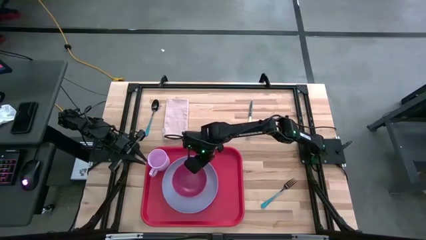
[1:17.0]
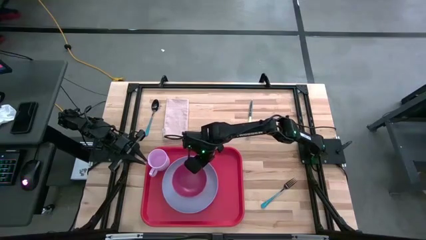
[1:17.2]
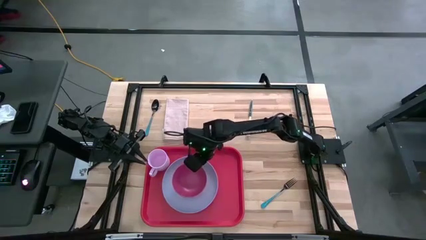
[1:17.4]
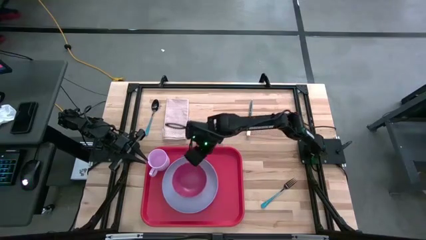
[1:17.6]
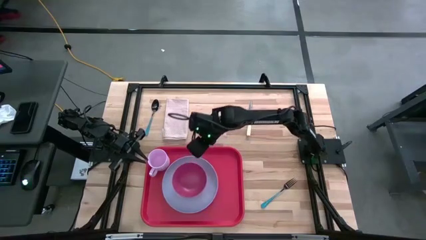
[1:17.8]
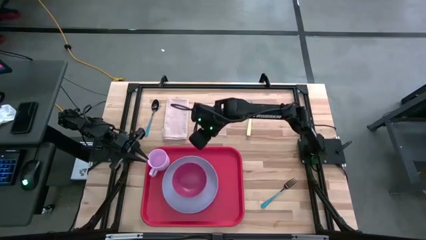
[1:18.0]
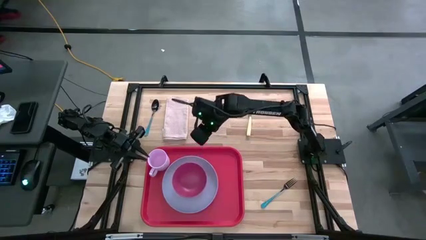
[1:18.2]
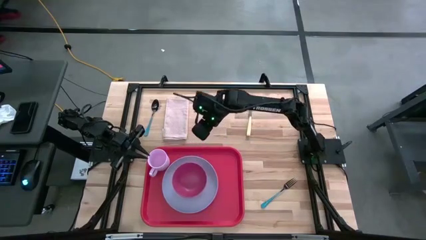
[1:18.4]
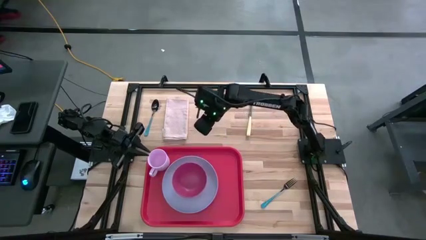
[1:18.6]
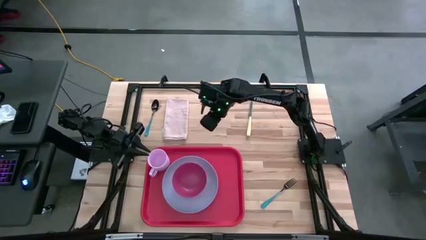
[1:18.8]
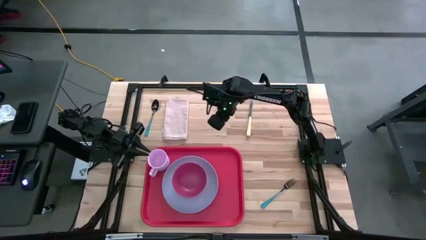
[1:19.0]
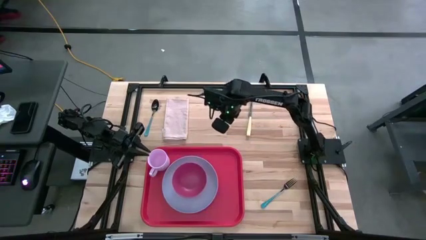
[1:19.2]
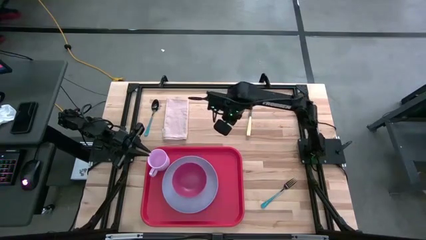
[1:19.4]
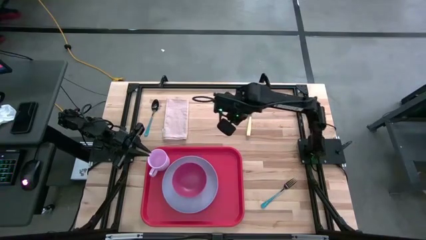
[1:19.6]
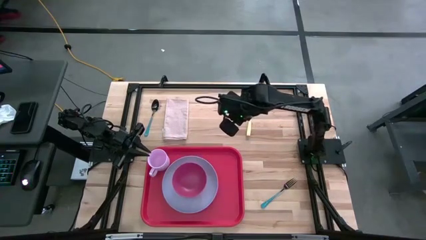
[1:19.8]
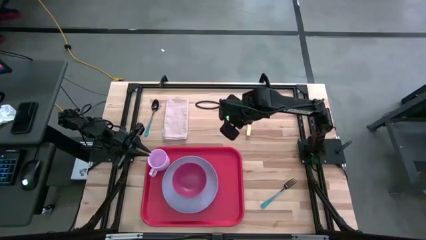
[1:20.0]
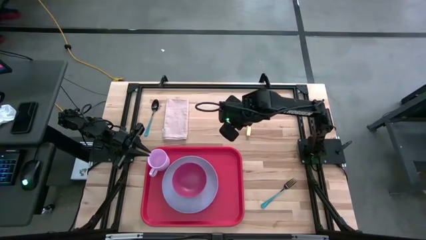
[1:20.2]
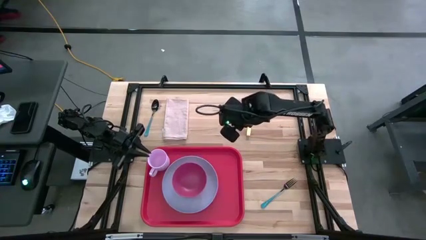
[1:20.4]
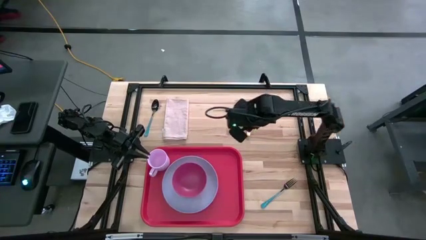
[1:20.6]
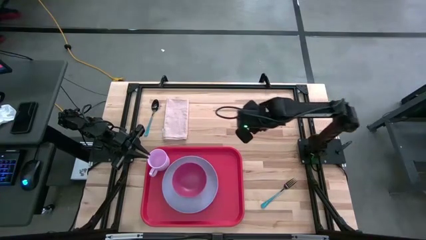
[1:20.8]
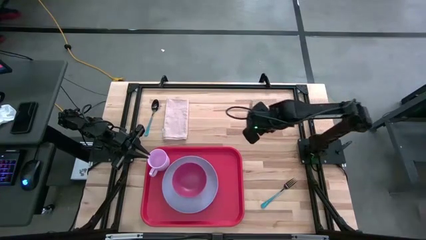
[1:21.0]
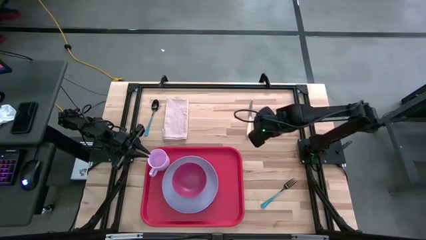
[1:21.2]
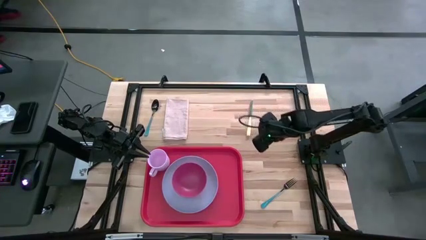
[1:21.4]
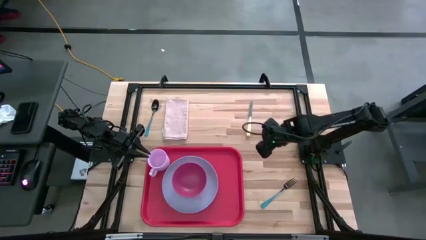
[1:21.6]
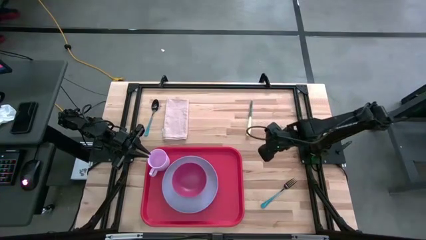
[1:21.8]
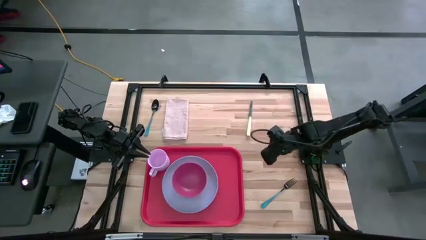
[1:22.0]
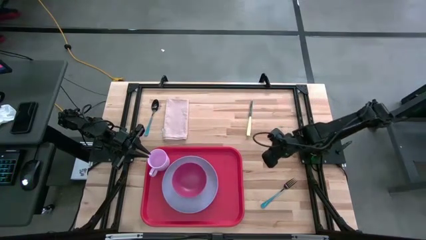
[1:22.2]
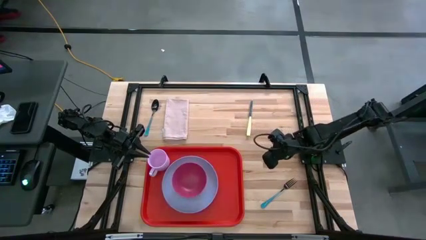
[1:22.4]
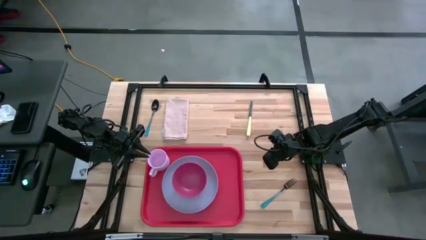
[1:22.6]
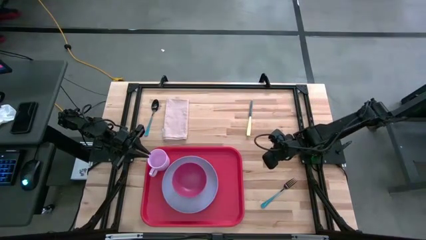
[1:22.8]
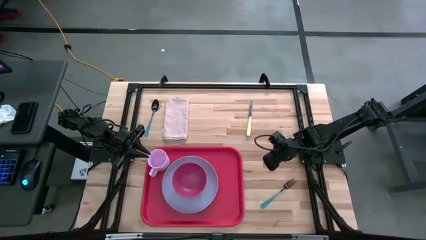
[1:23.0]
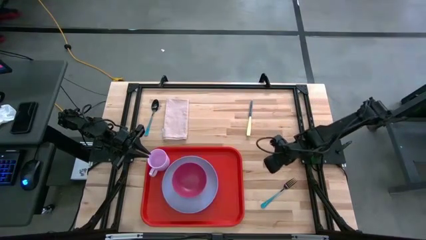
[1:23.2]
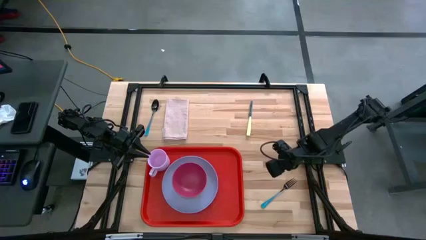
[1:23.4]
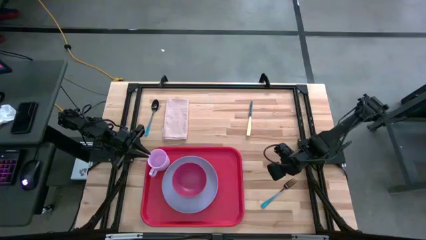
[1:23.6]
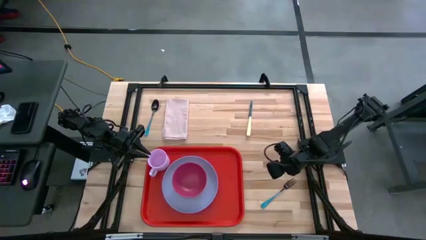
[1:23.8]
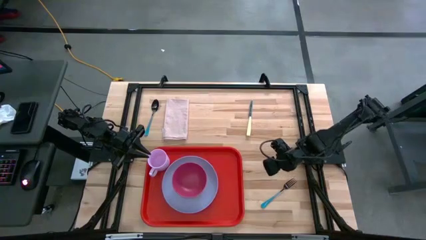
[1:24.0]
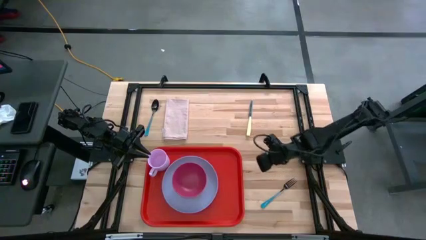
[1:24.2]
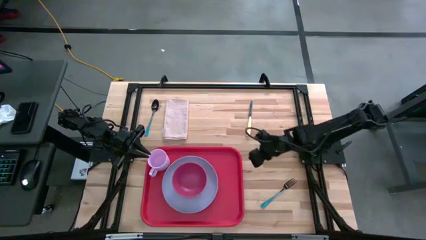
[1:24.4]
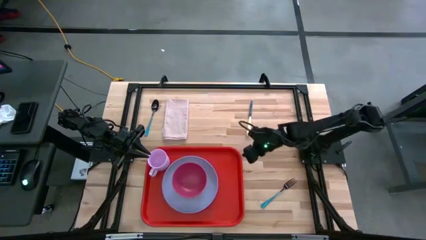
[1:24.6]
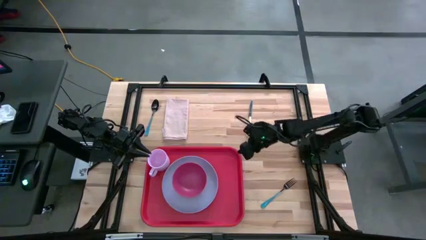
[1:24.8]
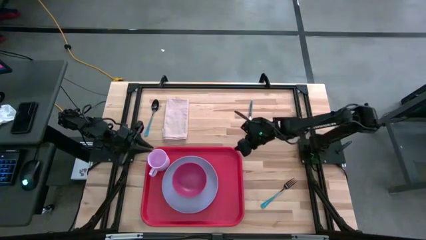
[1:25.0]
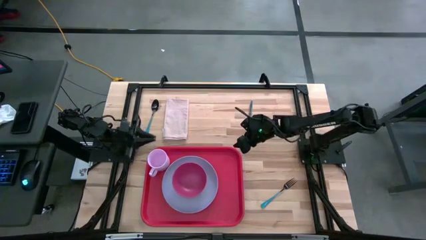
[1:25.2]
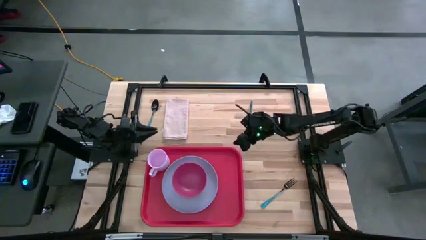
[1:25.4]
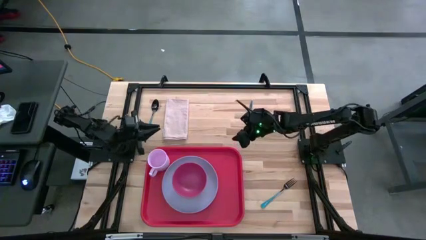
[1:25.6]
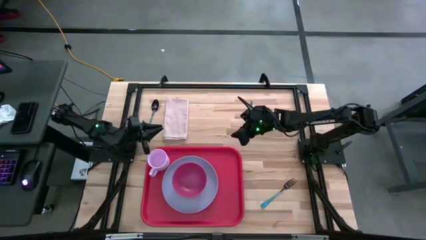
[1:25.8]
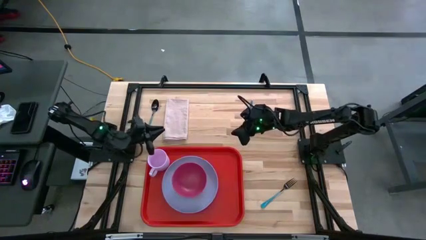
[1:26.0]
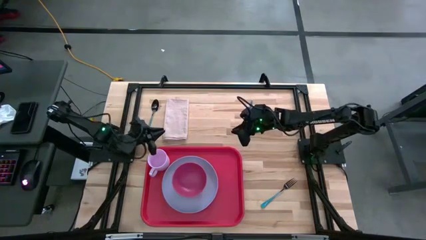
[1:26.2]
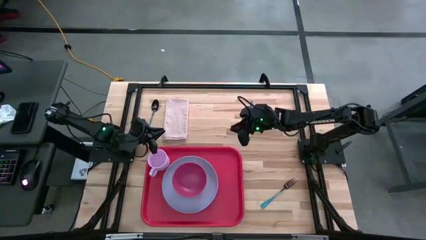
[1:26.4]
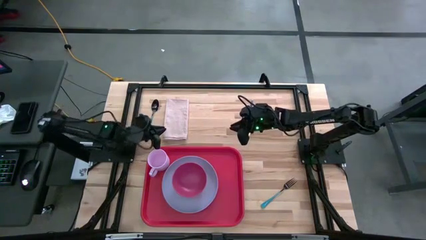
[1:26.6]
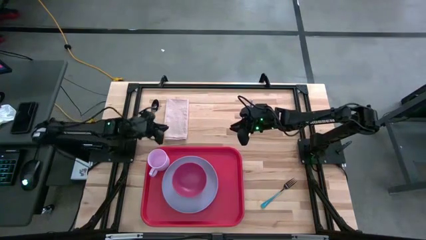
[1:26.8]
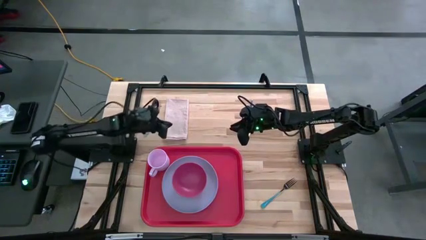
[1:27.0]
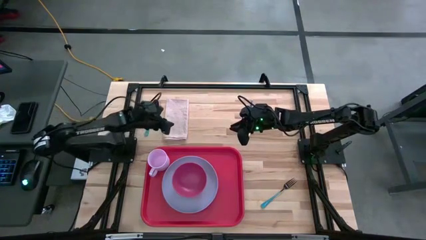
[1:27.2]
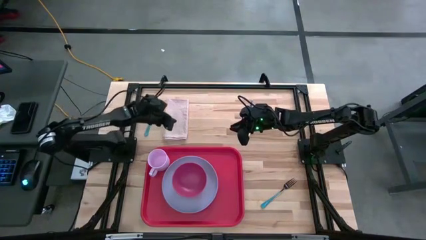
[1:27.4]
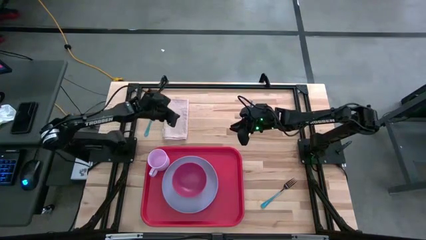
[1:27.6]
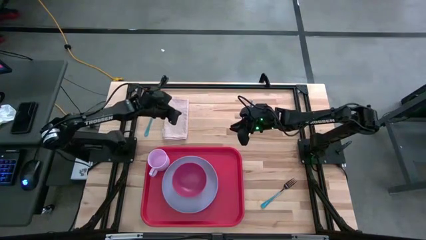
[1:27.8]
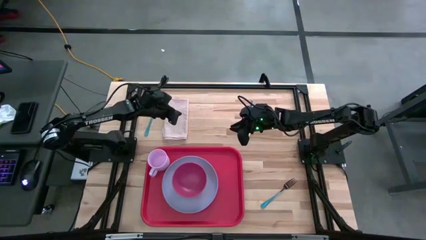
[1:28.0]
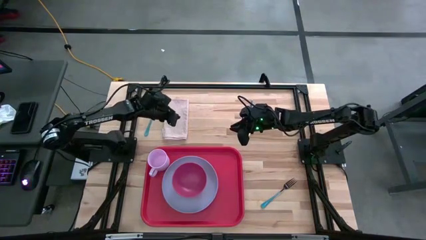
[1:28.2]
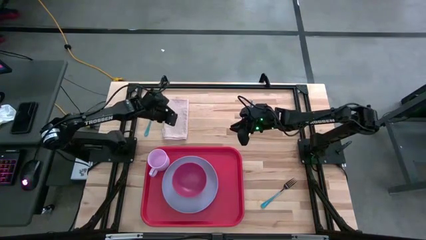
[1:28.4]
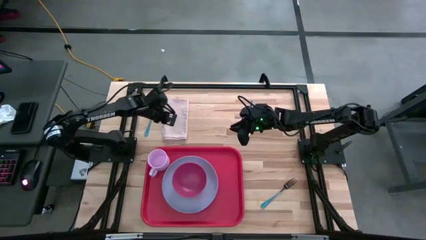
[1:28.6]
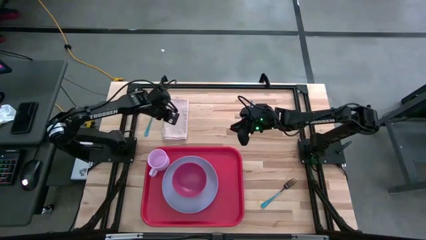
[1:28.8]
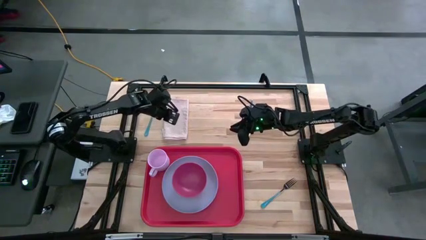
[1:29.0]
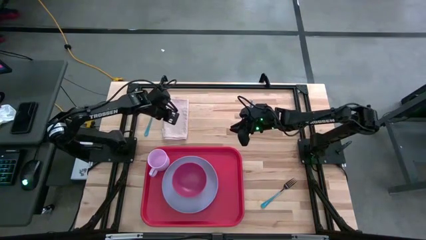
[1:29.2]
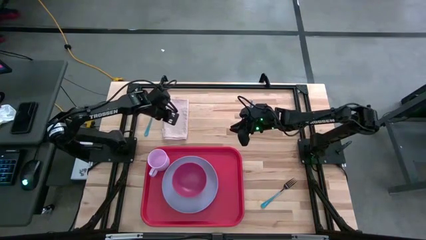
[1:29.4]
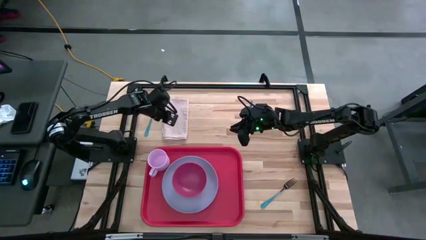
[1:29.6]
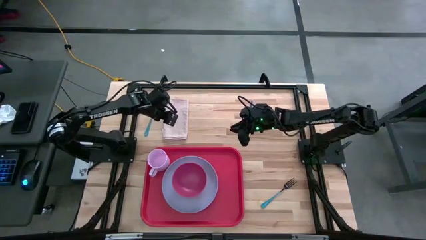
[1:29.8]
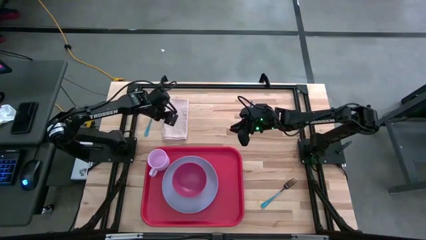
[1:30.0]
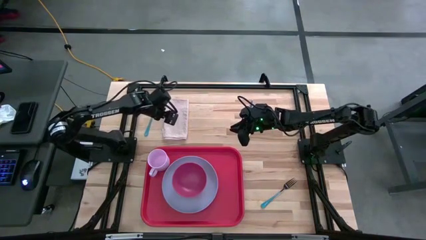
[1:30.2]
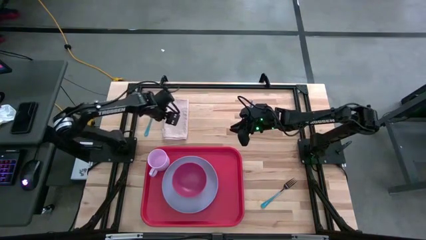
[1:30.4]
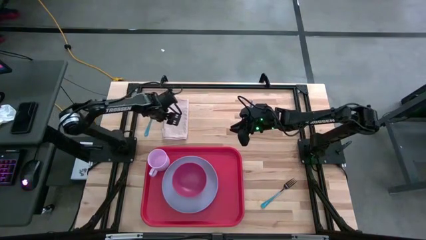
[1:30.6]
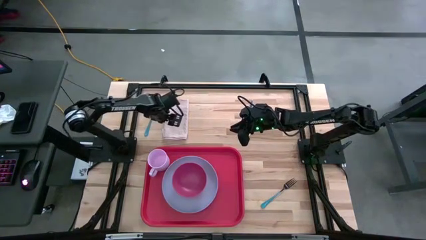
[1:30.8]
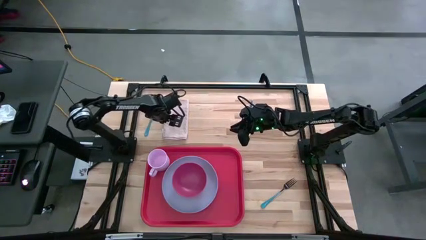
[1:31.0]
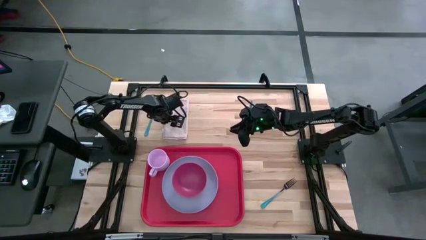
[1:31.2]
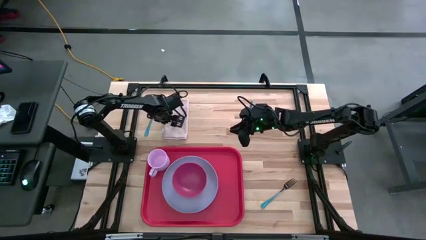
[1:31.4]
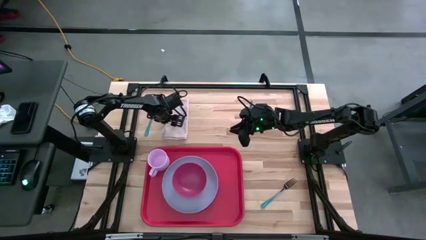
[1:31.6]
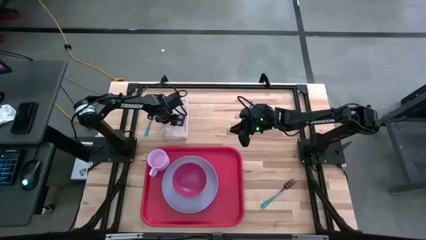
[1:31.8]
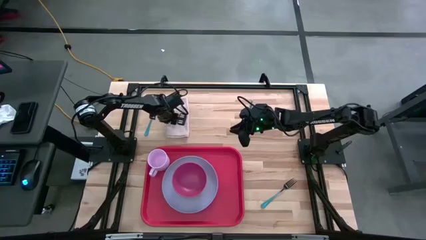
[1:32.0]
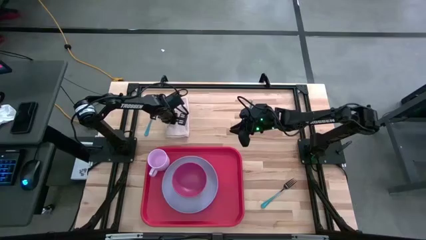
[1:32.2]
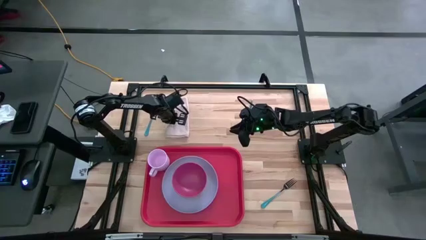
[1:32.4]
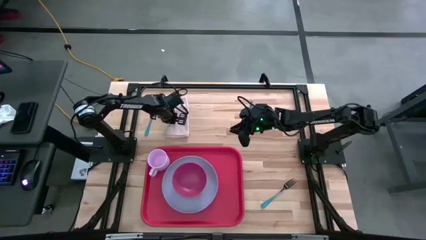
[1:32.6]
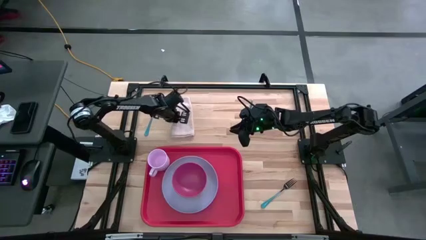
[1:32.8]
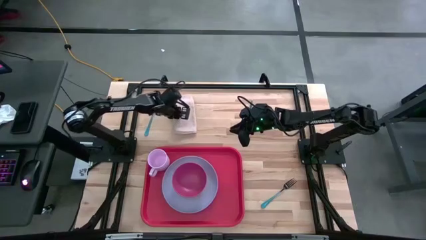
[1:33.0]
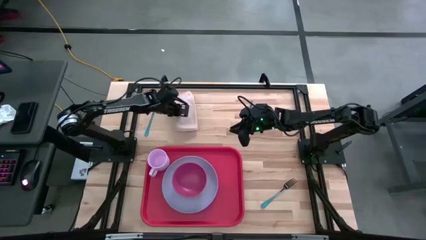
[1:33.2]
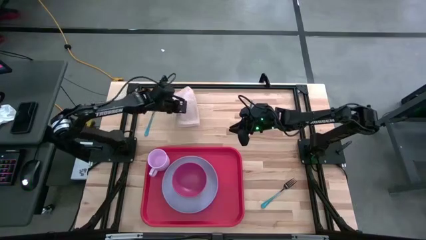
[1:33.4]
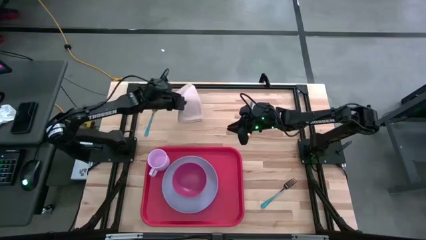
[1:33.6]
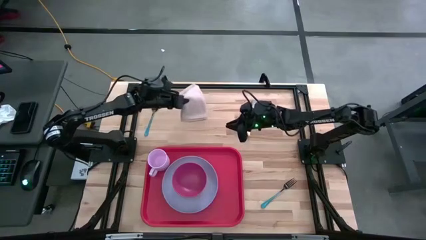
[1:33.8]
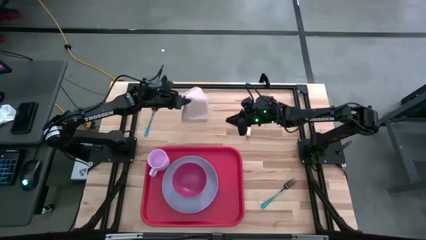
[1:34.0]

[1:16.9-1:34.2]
Task: Set up tray
Put the peach napkin to the right of the purple plate on the orange serving tray
